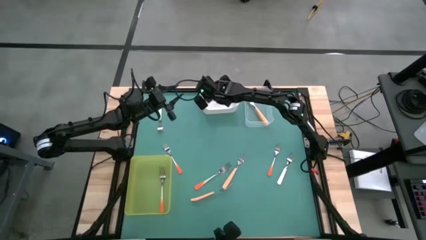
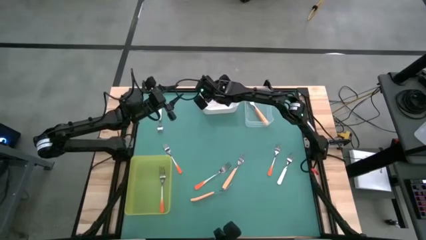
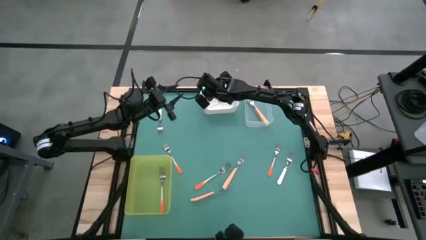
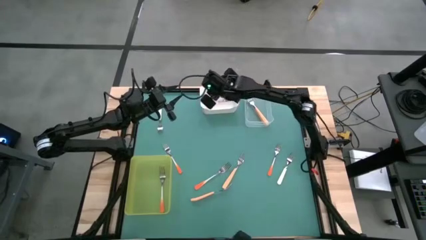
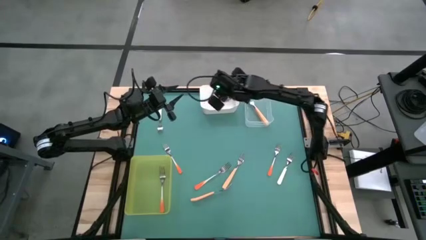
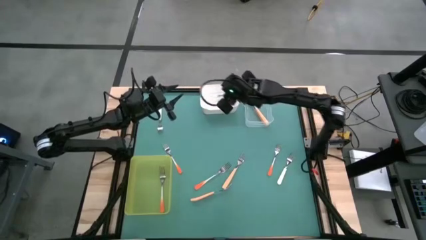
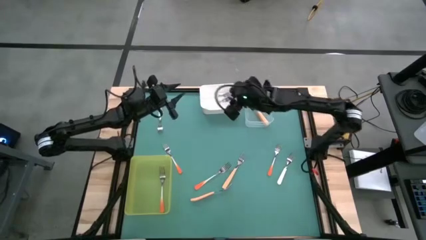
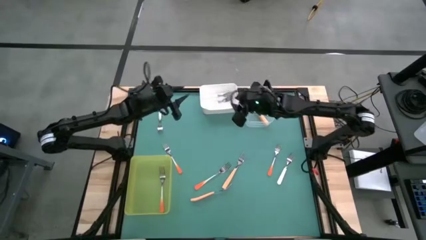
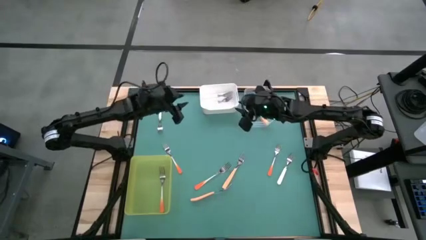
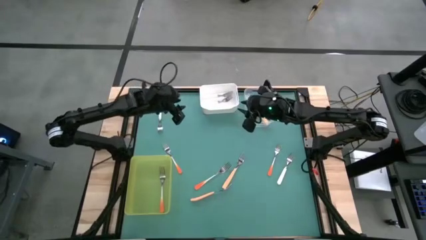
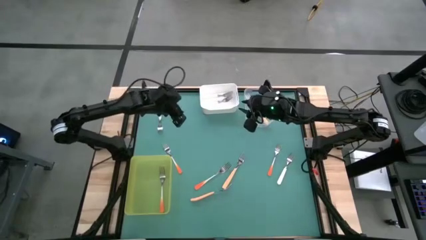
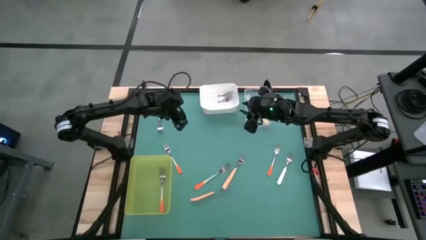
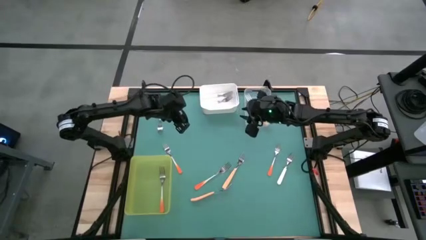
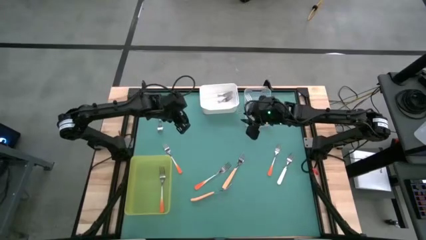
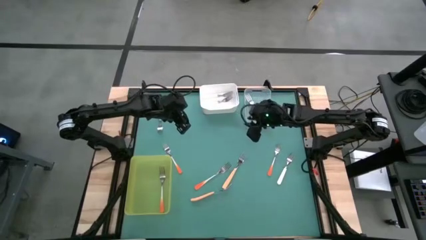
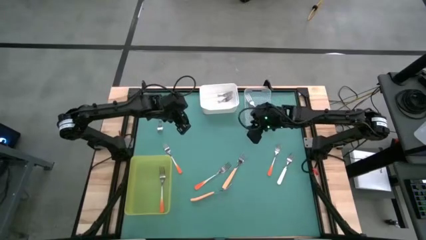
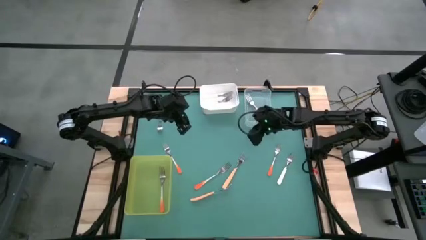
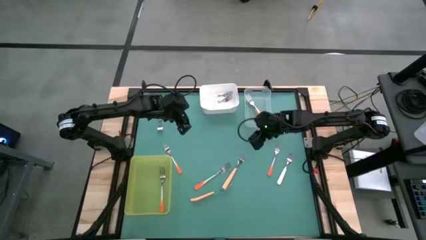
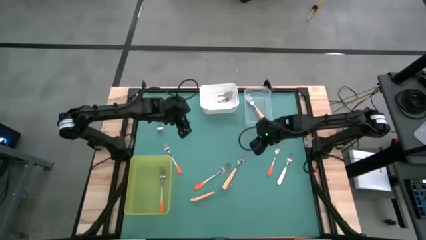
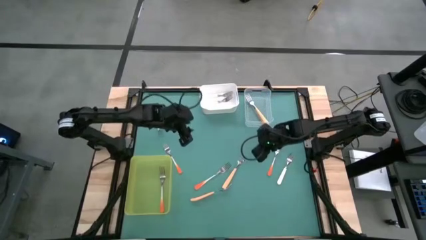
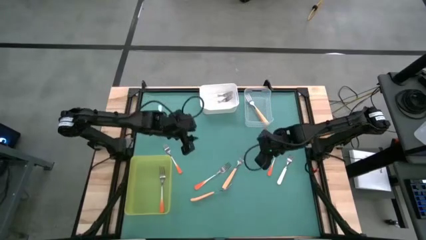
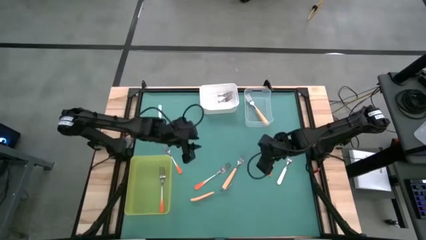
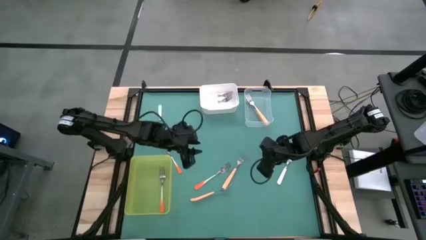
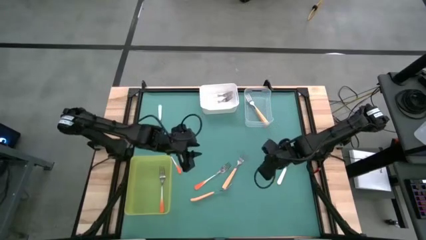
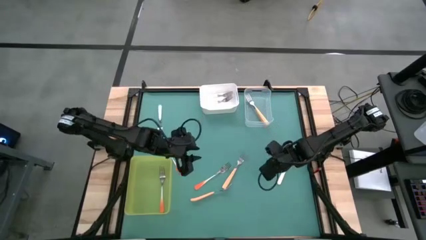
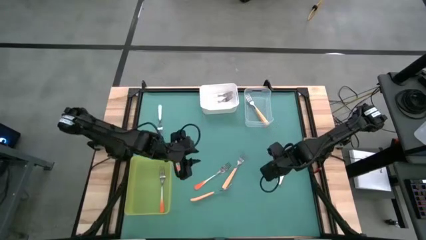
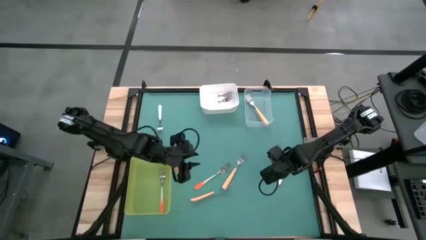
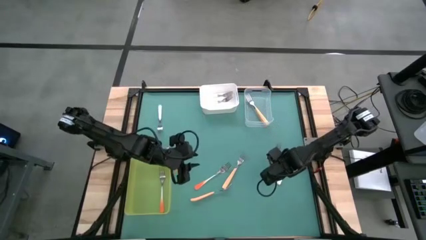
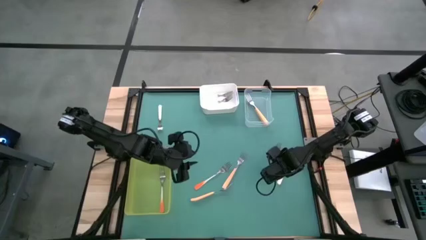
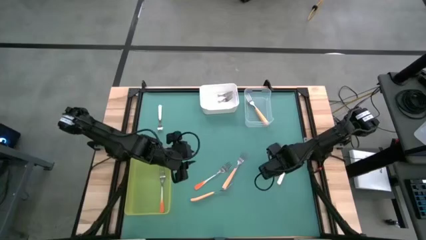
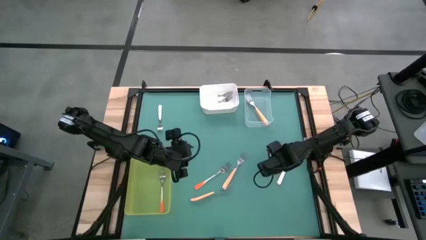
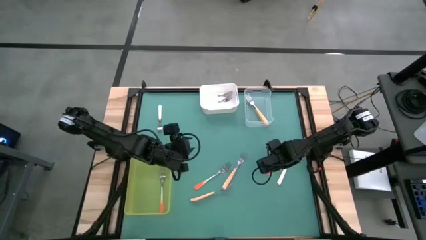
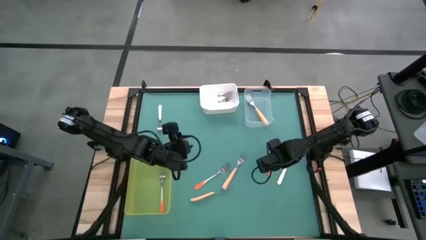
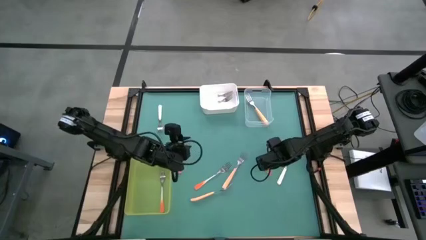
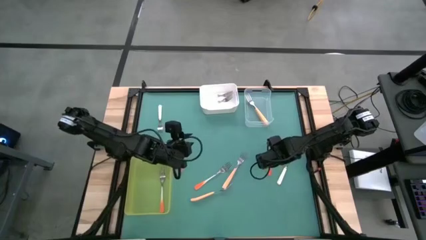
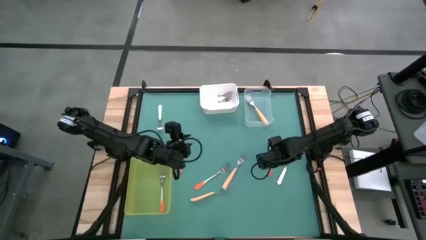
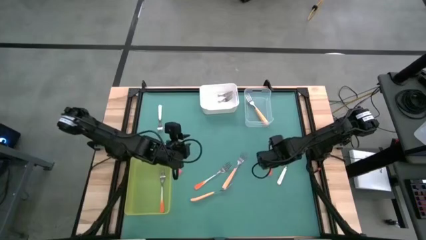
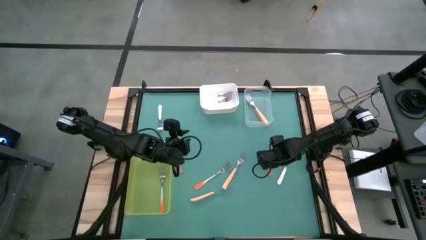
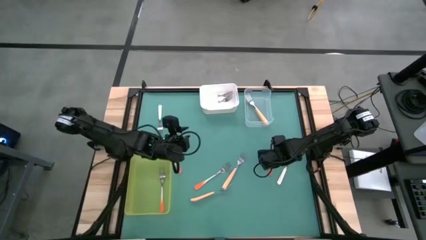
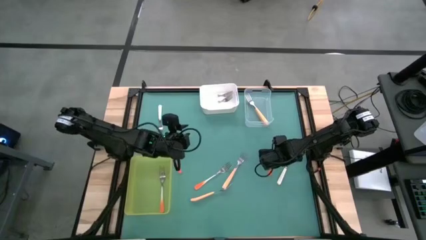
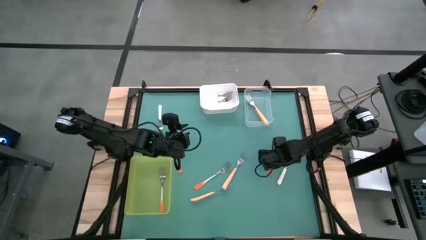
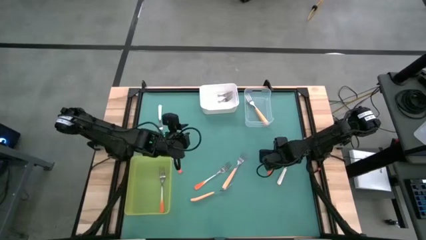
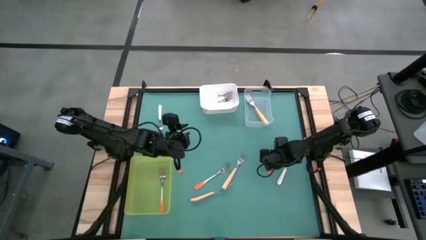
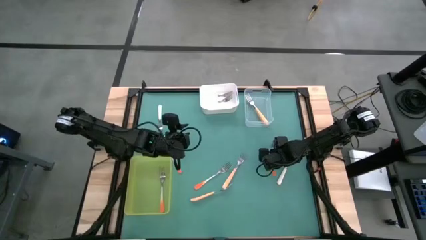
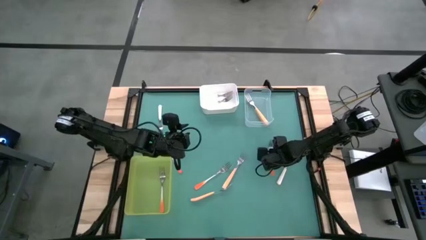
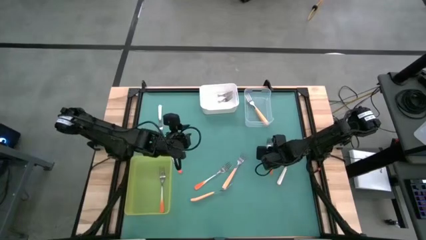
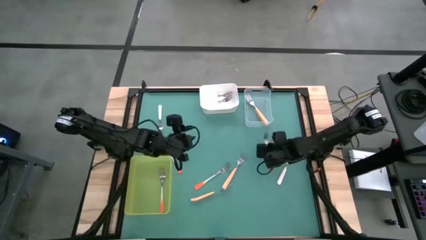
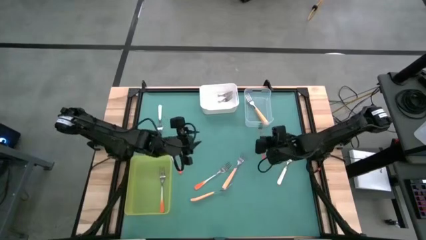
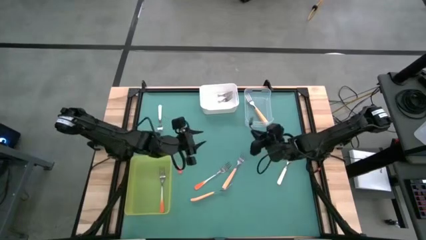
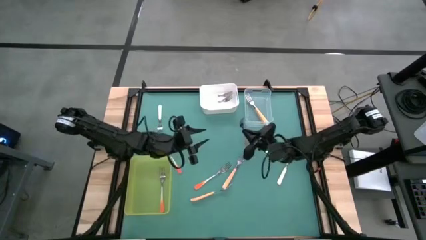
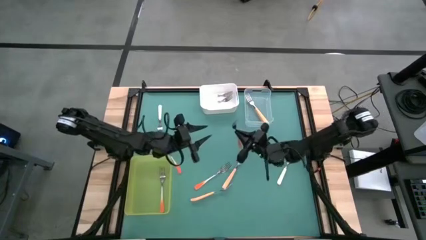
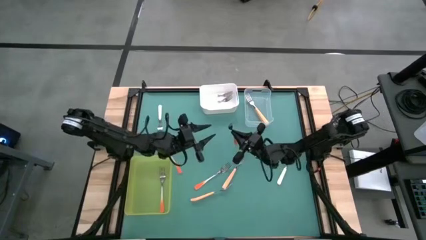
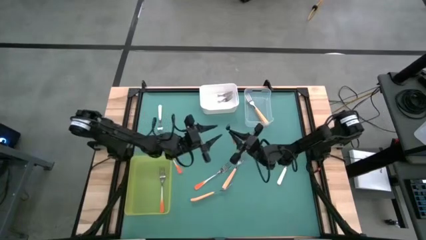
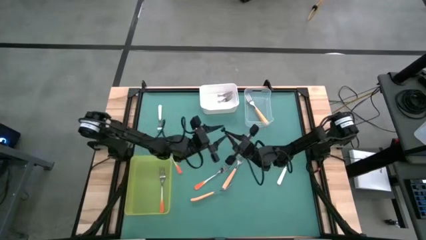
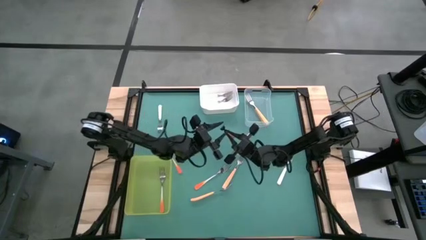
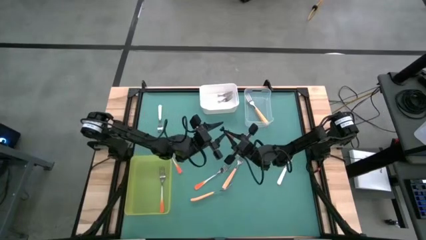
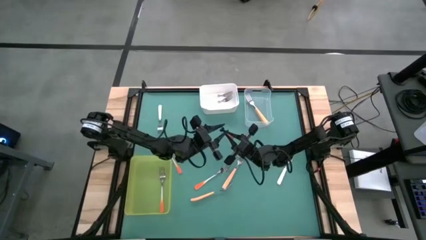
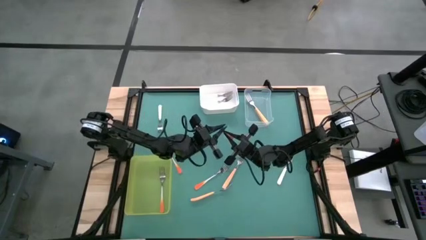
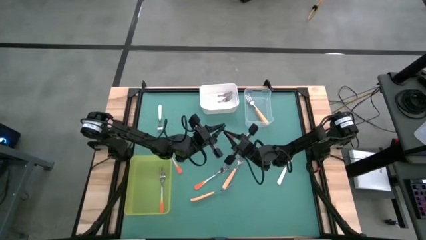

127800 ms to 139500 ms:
Task: Sort silverware by color (type)
Put the orange fork into the yellow bin

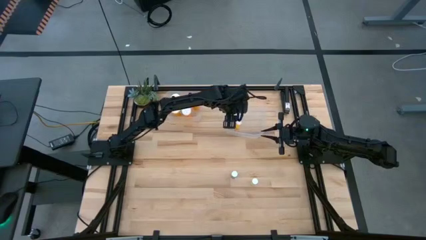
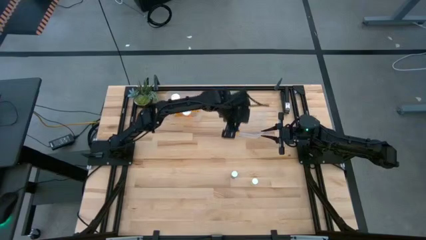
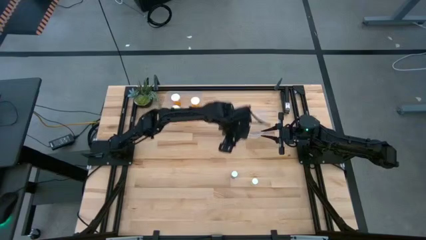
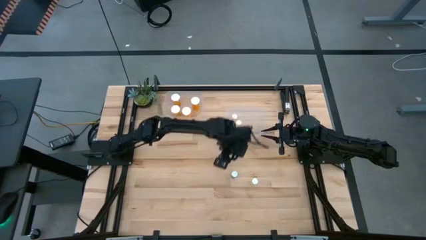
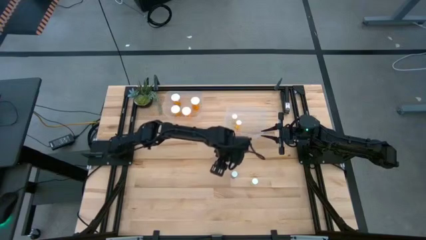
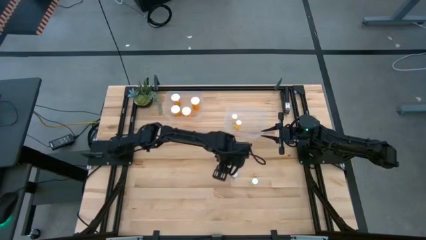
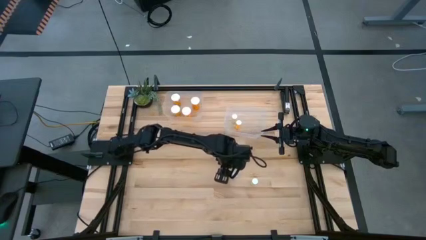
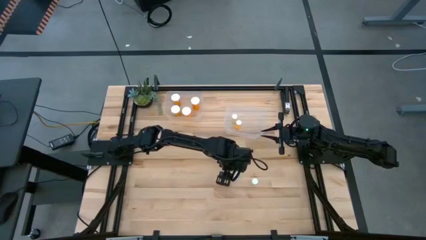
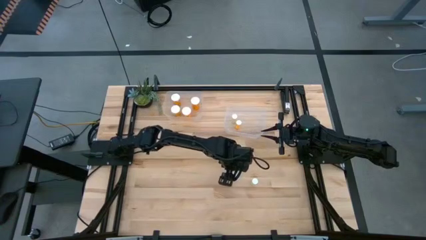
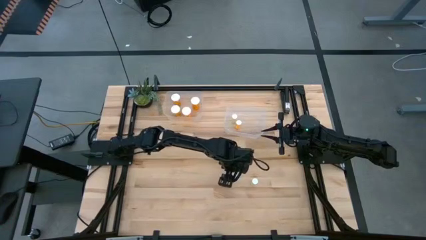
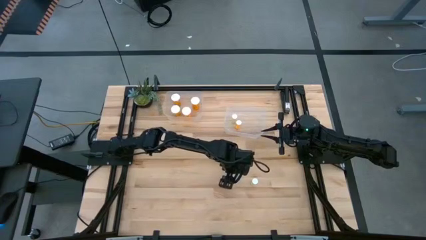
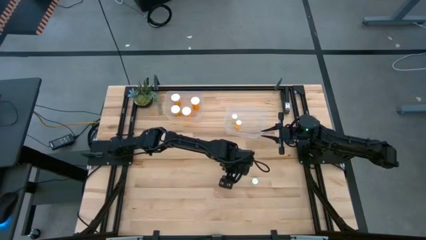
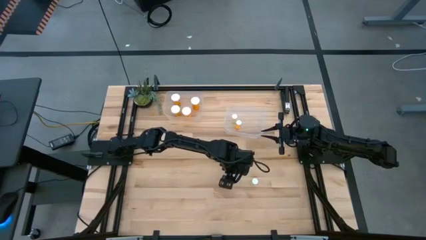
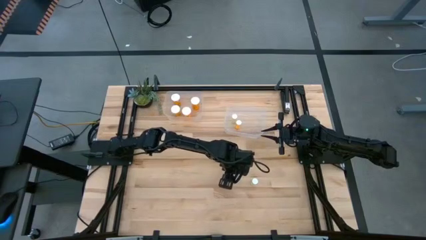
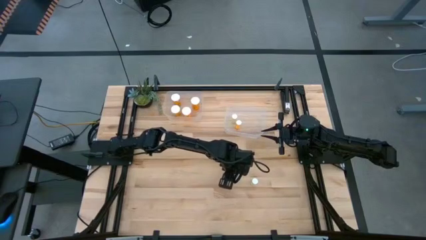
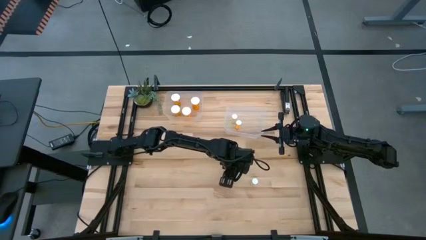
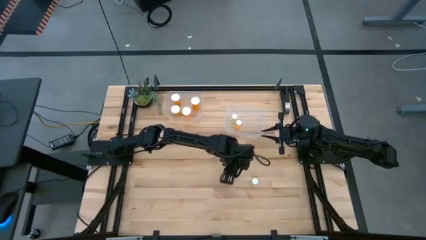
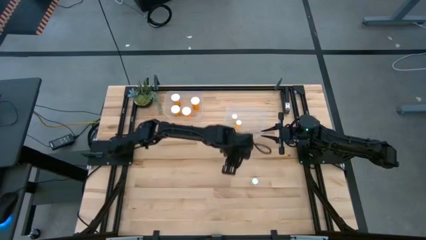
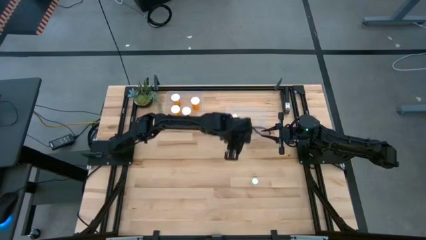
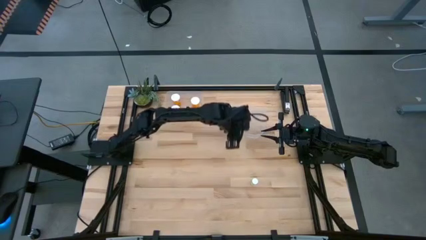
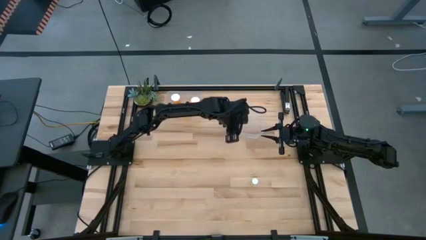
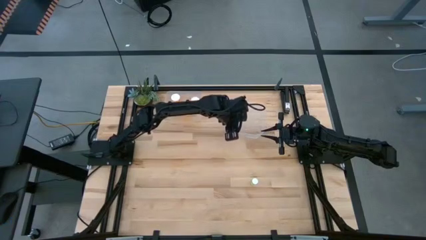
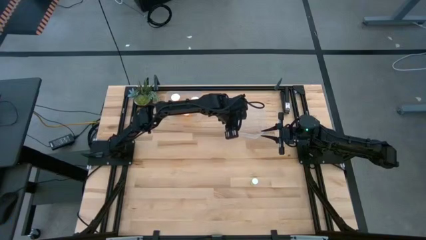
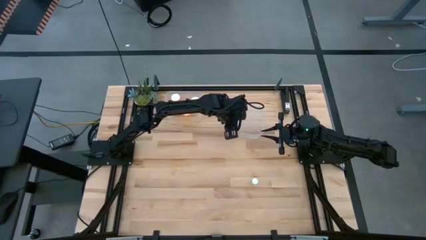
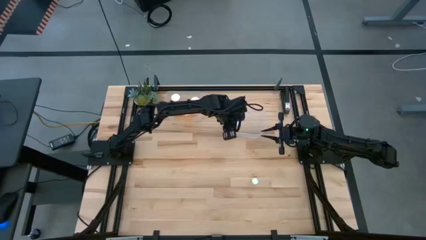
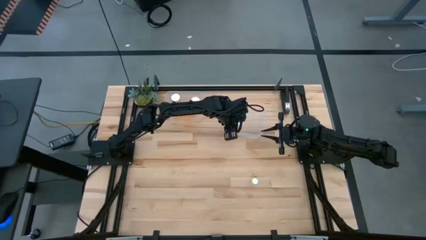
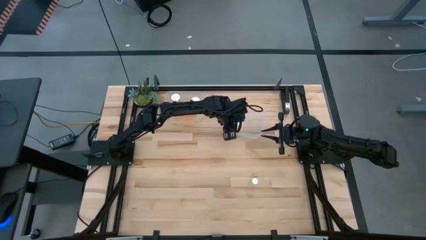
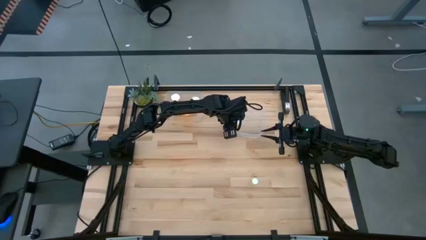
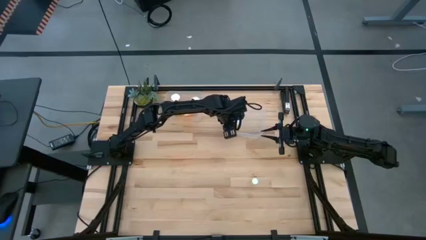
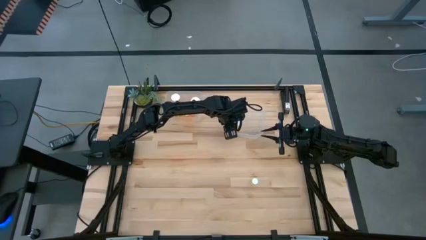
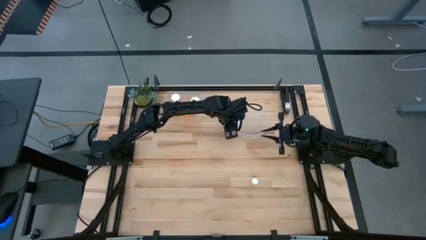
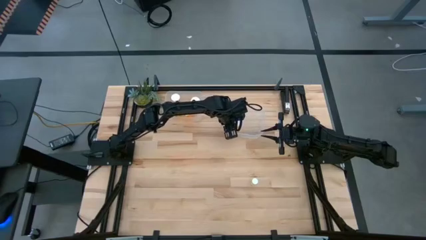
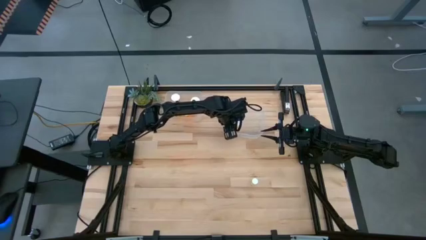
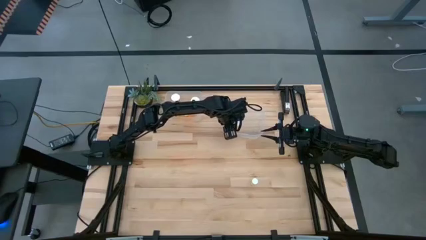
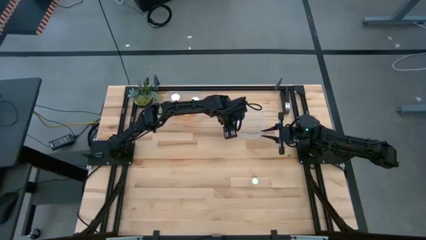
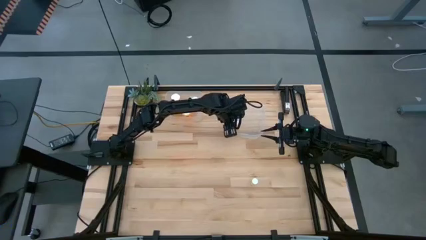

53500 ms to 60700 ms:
Task: Pick and place medicine bottles into bin by pill shape (circle, oval)
Put the small blue pill bottle into the right transparent bin
